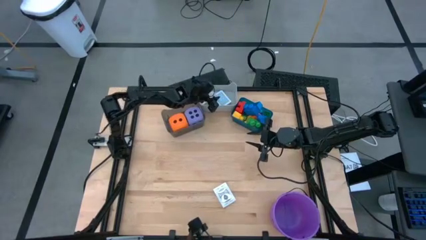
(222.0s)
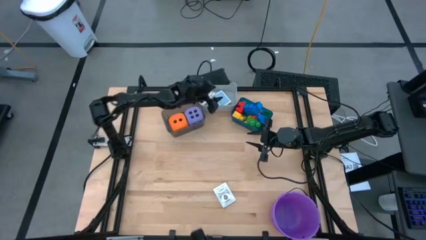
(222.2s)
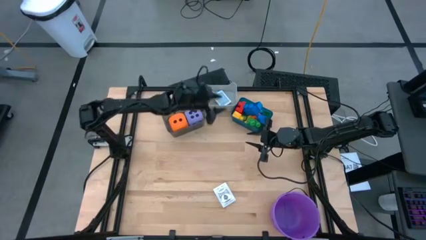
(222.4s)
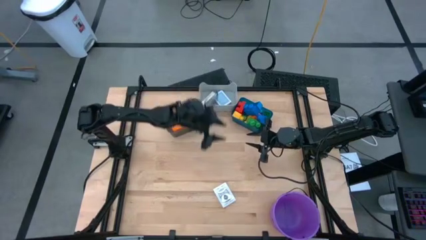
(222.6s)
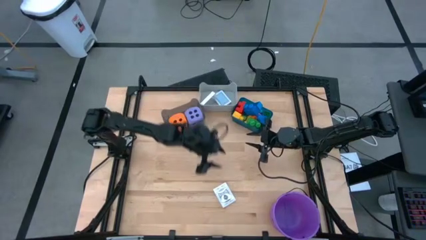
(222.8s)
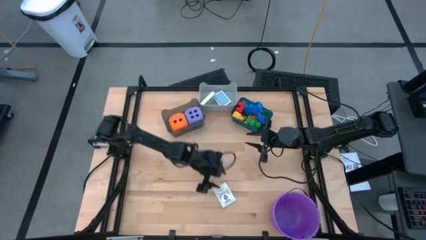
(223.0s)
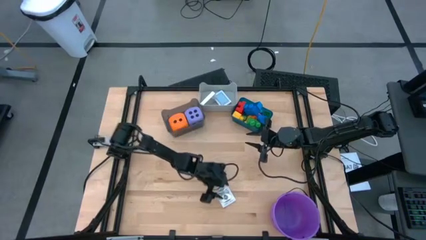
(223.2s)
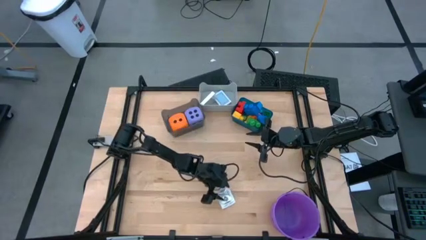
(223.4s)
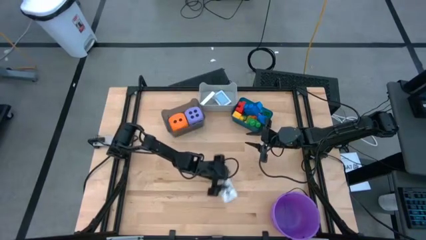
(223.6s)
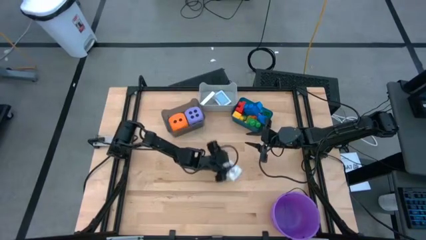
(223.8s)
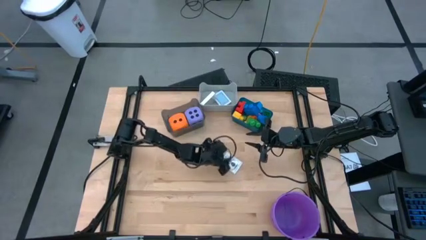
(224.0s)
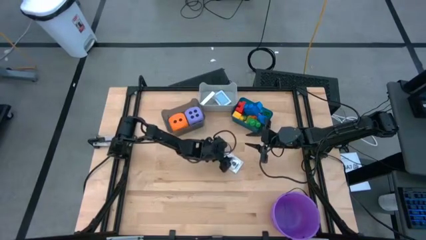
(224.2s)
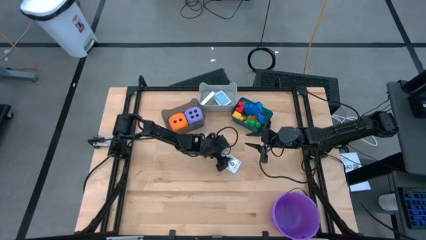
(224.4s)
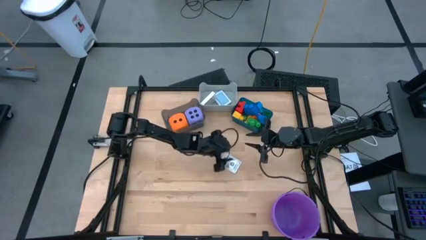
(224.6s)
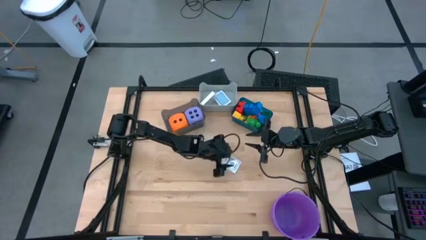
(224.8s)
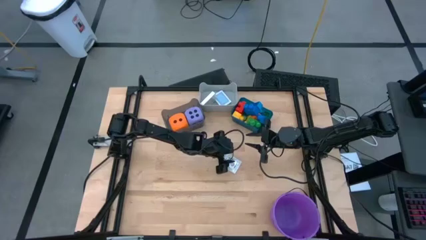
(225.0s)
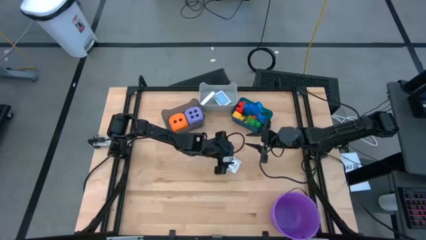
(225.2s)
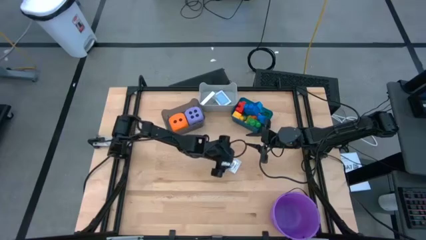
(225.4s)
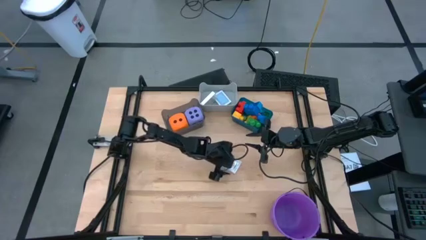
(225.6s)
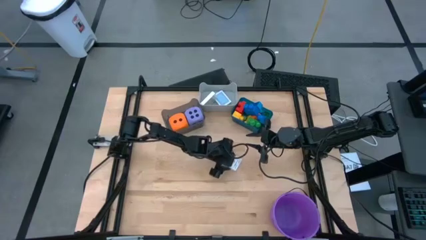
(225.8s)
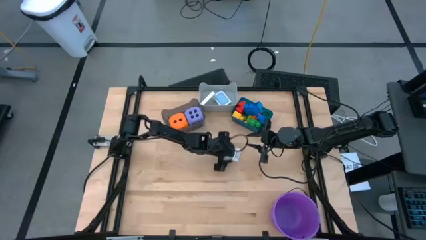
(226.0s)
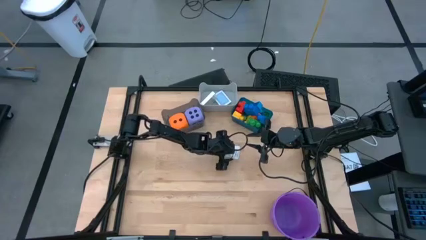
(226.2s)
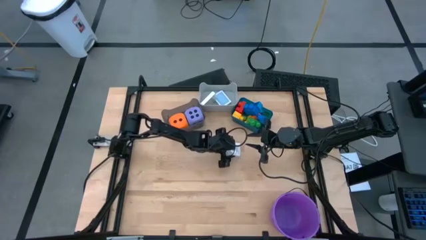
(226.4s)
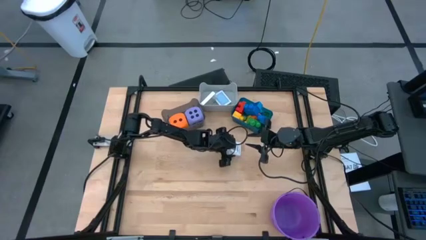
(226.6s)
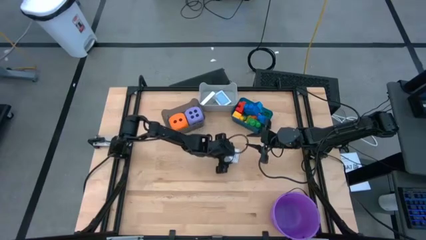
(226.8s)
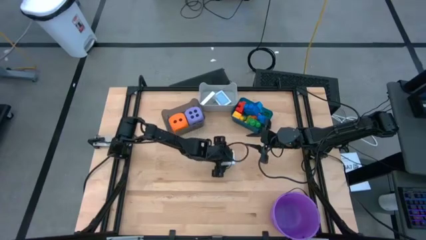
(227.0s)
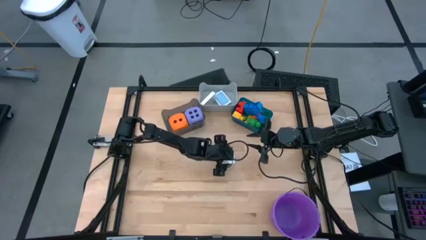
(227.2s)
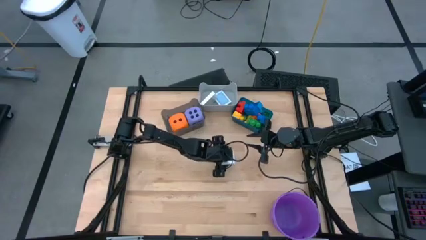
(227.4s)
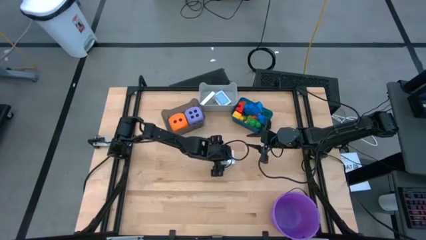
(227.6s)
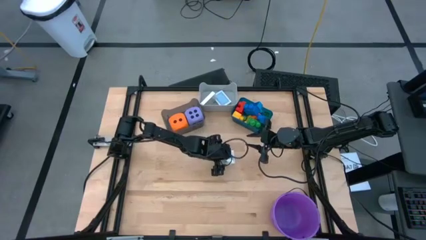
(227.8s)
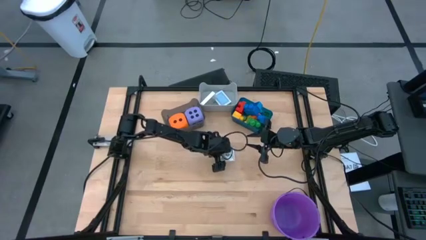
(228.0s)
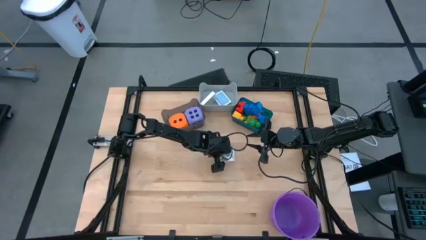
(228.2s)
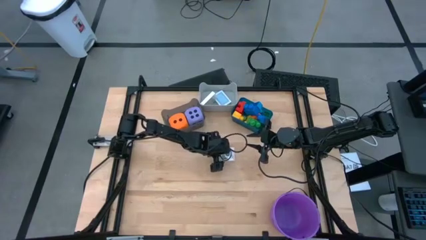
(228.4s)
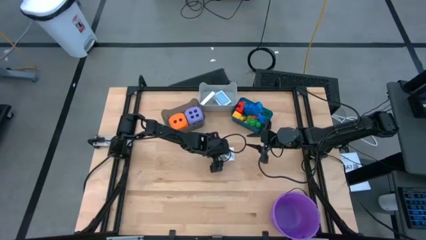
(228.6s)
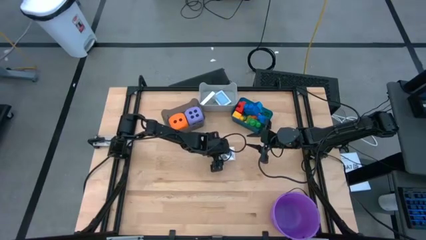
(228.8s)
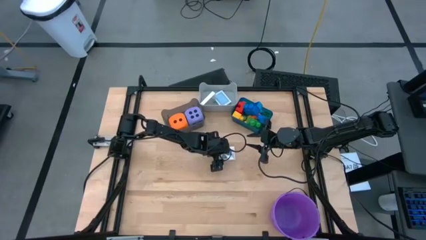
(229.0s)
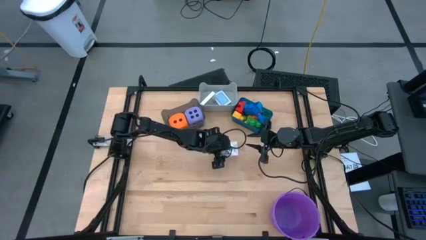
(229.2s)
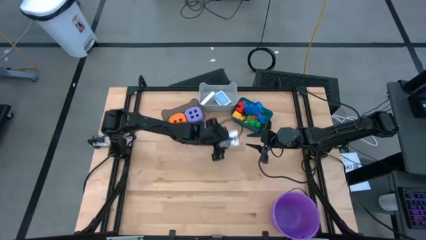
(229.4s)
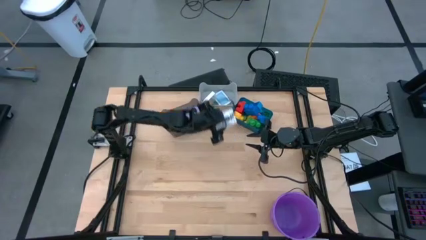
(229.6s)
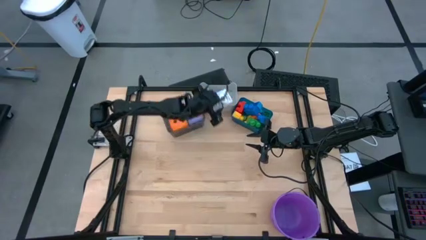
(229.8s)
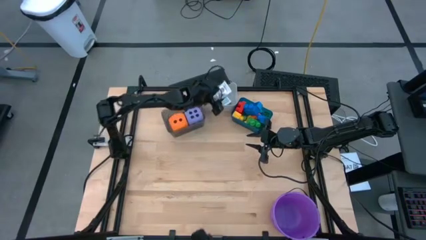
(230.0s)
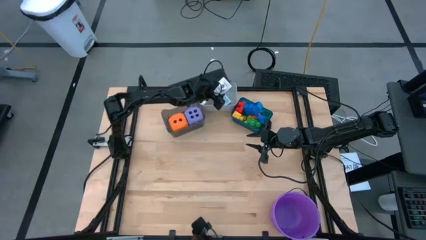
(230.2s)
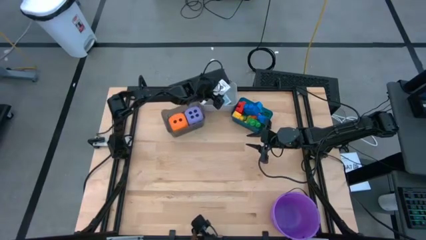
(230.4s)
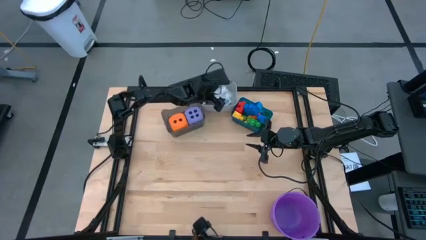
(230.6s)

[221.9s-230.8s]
Task: Pick & Place Toys
Put the black deck of cards into the gray bin

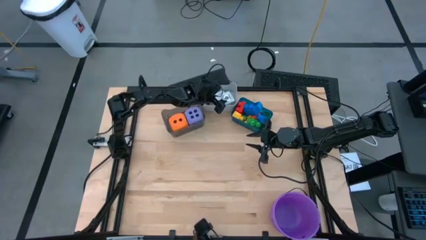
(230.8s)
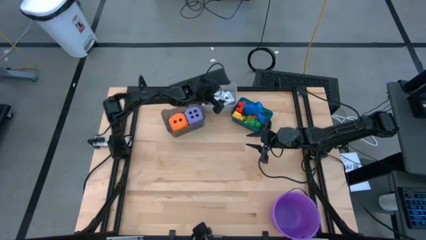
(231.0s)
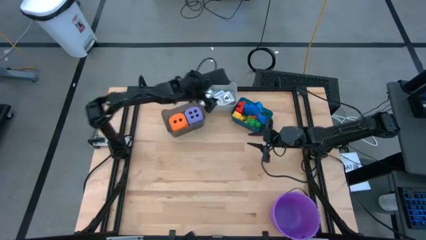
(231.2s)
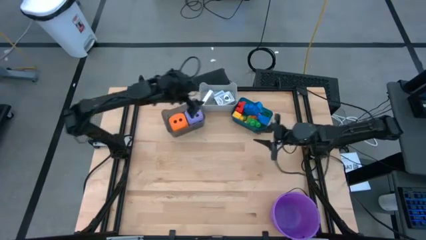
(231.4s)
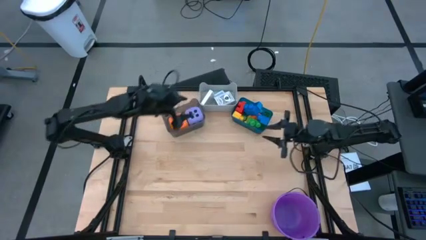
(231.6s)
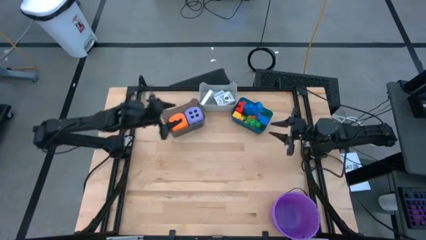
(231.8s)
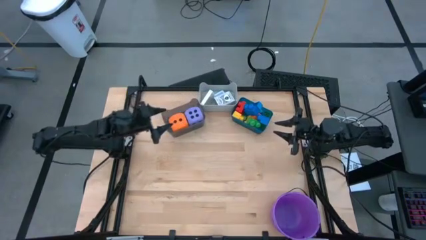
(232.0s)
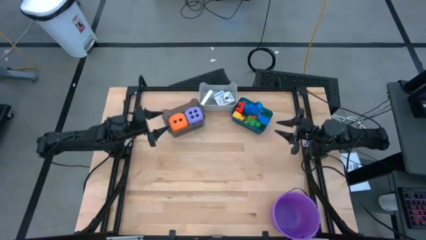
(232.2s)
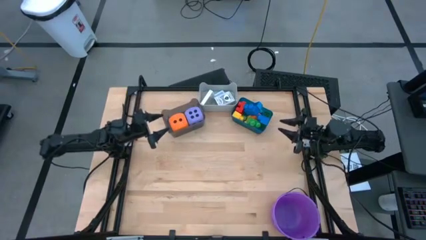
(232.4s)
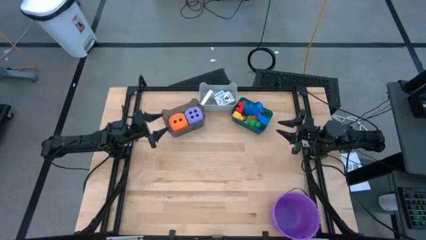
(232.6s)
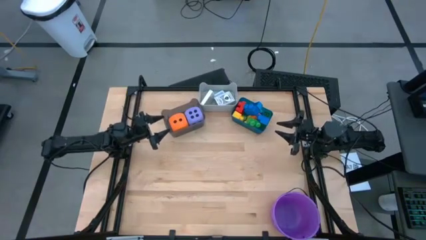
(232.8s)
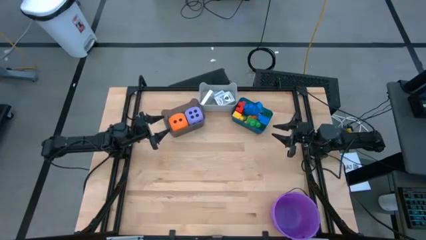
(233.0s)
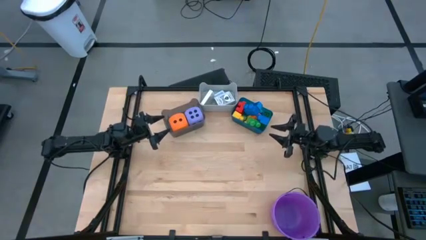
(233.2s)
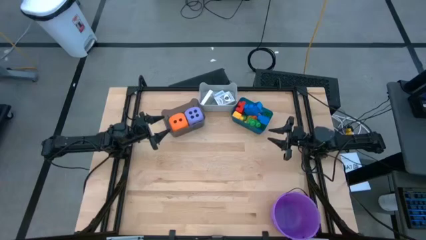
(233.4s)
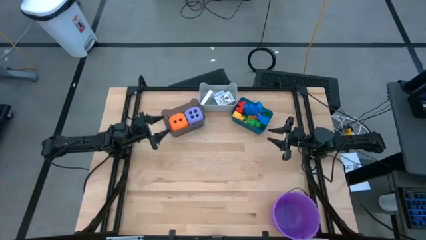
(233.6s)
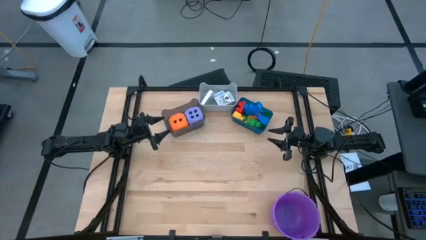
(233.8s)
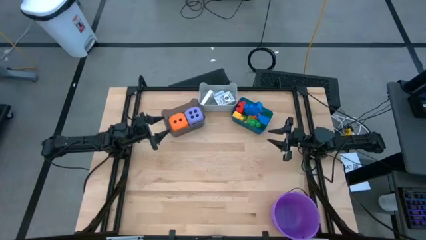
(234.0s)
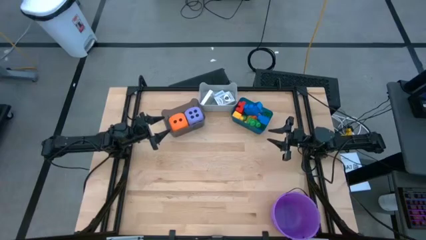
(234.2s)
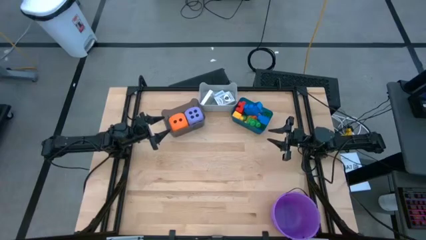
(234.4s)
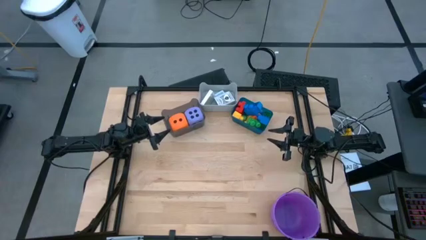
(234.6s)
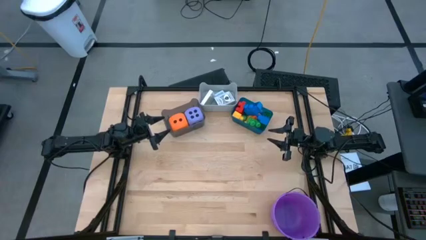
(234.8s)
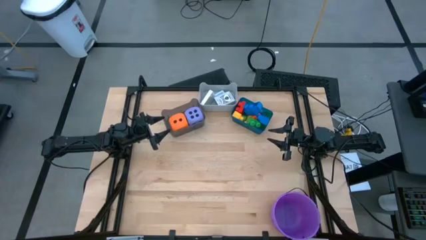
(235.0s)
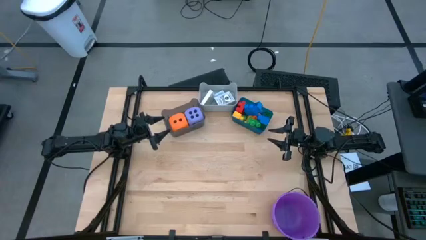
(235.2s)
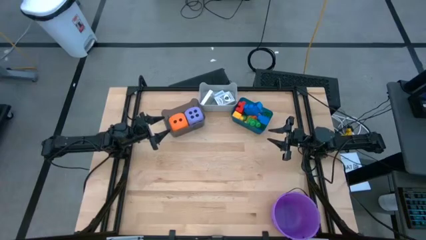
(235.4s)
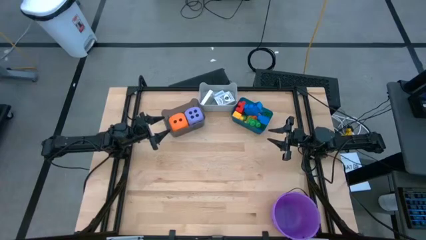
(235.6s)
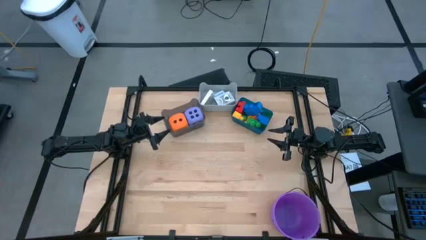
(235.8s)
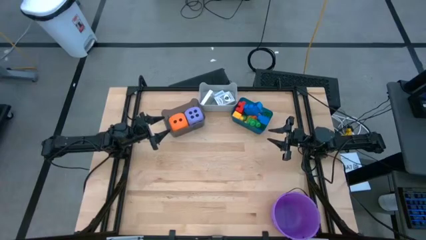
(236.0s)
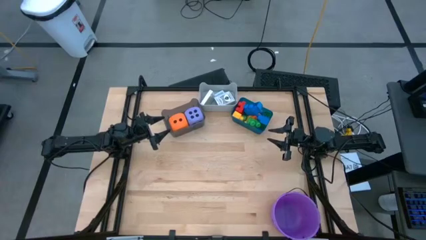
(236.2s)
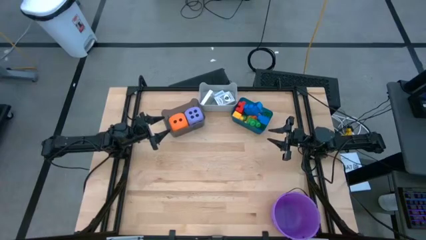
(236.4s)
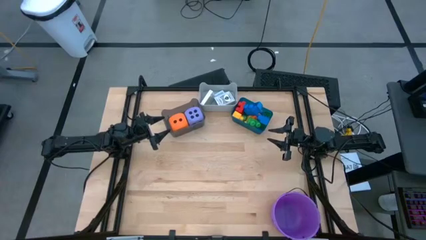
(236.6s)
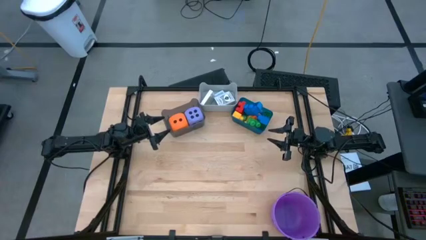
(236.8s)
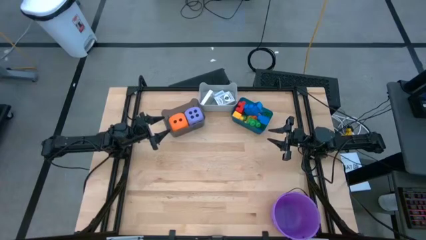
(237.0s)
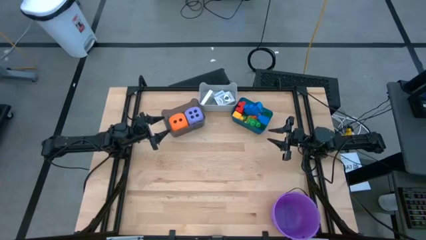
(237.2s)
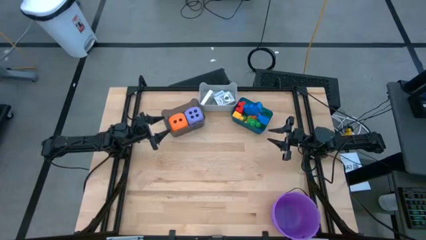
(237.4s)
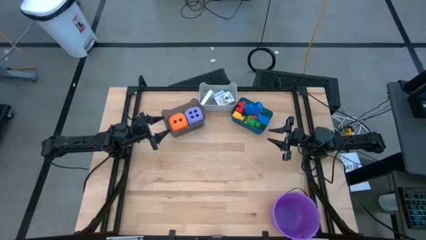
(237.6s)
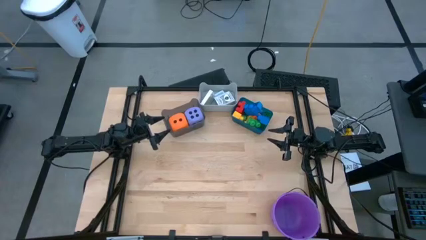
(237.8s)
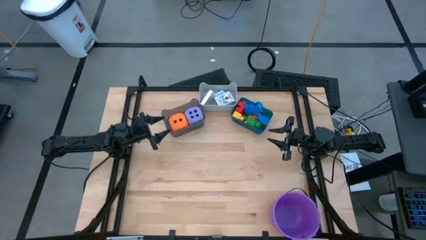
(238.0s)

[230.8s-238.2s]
Return to Home Position
